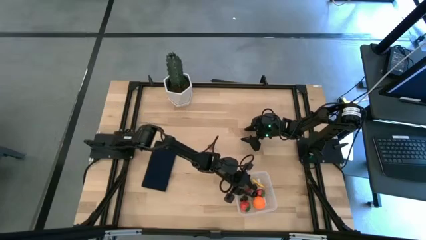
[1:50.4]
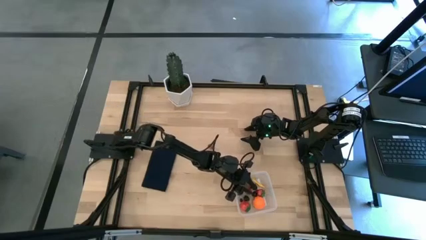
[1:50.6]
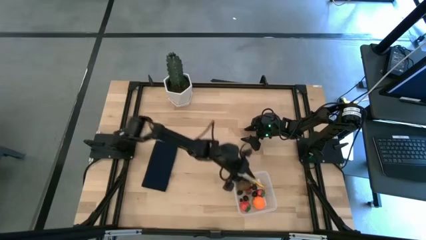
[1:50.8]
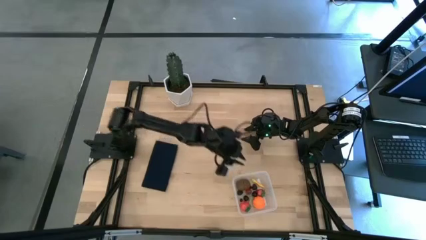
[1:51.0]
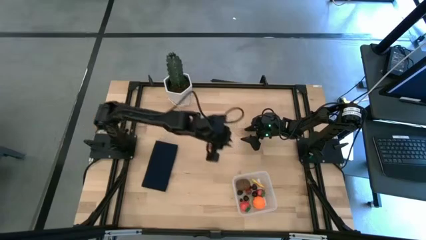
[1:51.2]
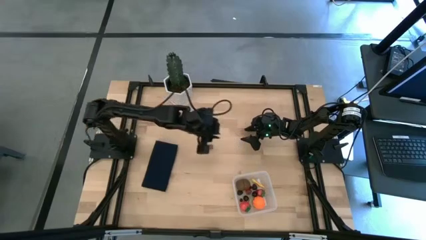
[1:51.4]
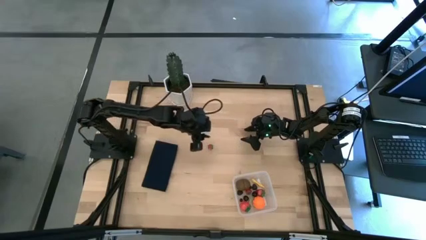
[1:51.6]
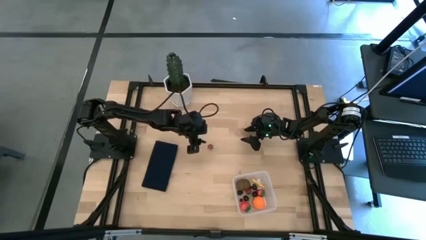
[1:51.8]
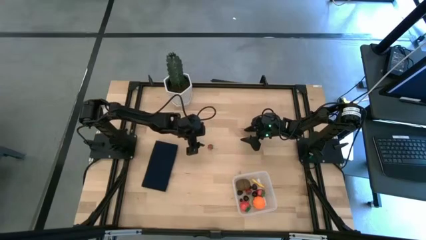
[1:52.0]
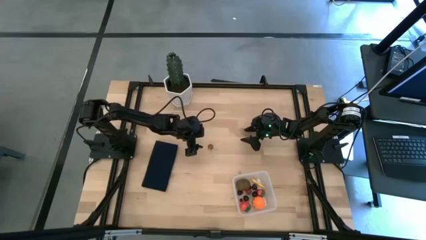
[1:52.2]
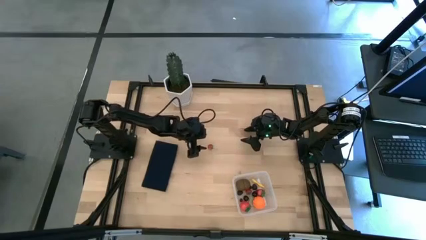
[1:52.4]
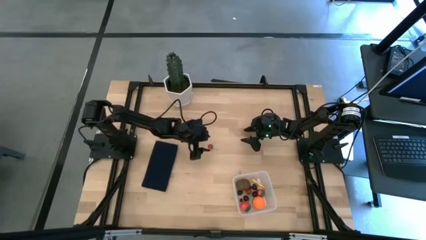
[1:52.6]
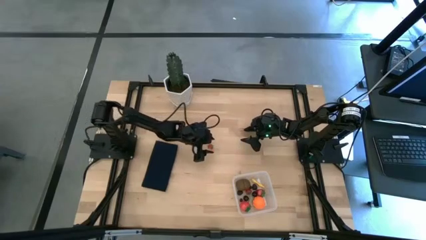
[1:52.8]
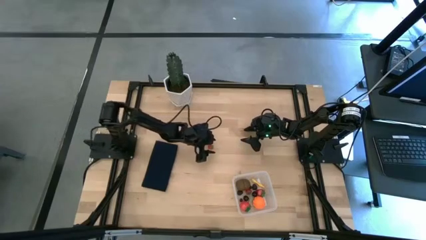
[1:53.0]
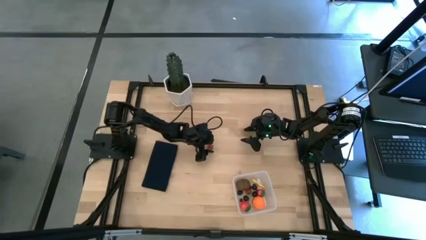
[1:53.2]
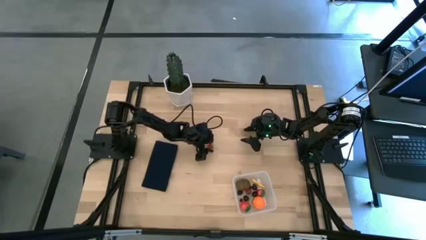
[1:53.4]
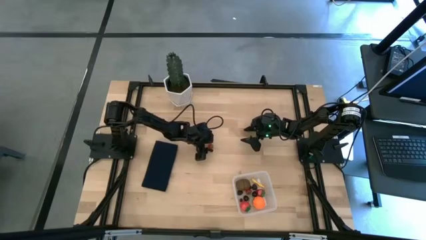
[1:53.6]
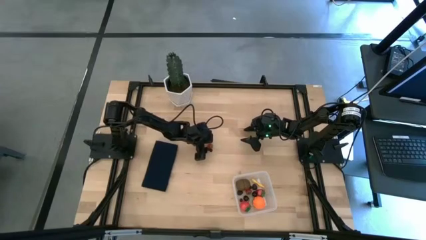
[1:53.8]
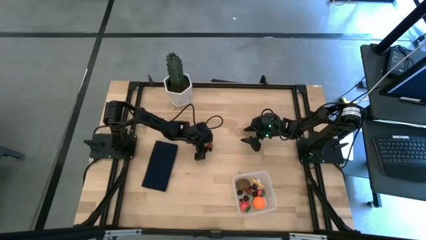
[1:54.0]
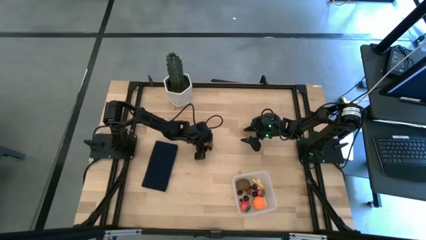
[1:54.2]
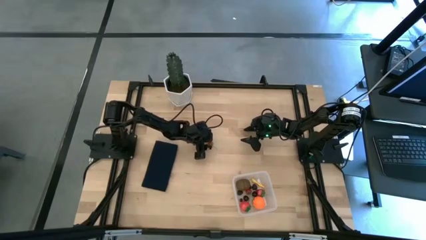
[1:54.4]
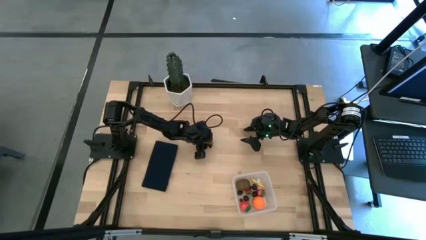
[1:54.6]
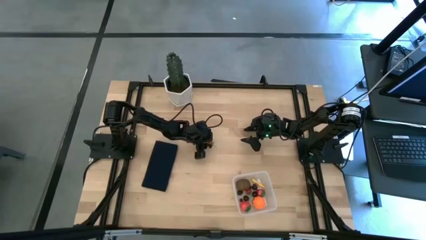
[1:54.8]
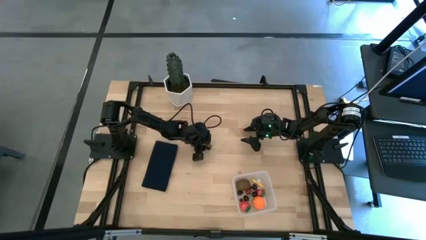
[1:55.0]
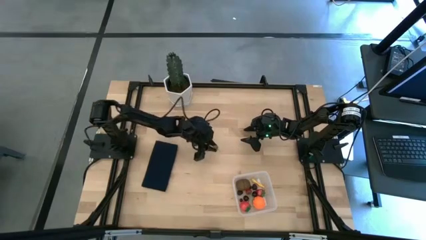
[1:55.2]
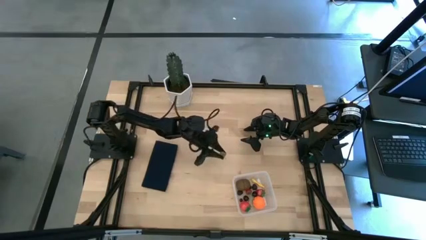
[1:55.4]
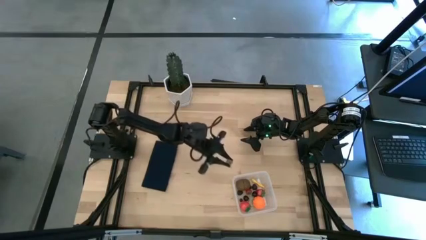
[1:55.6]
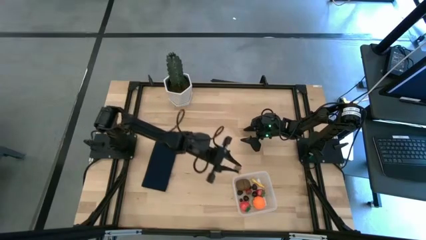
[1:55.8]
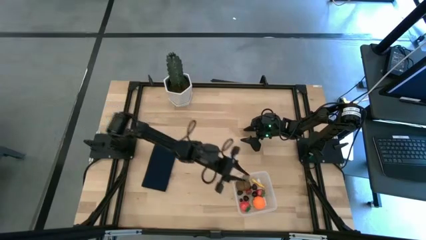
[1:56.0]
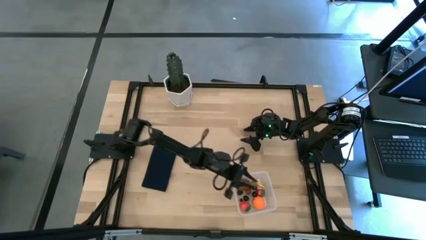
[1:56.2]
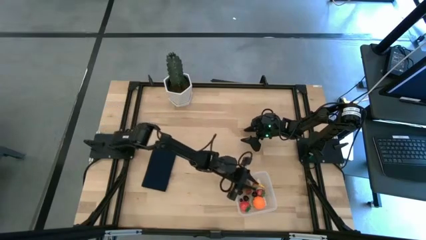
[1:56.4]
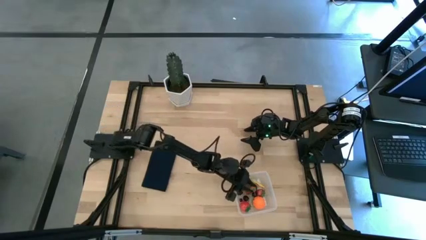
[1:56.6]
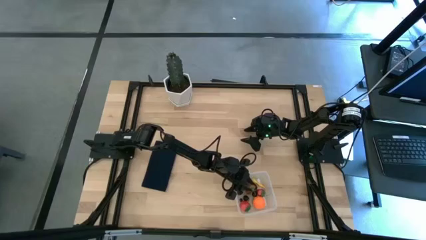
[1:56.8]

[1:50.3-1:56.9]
Task: Pick and placing Produce into tupperware
Put the strawberry into the transparent bin

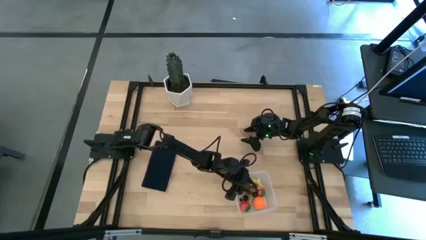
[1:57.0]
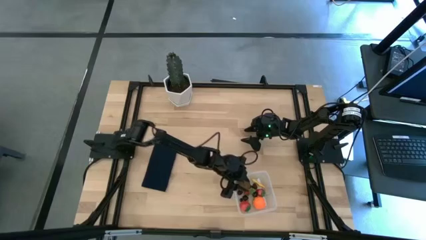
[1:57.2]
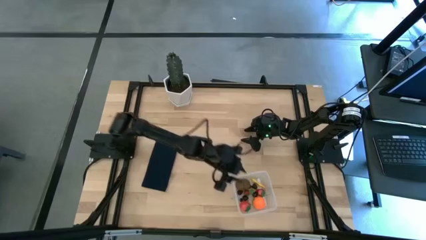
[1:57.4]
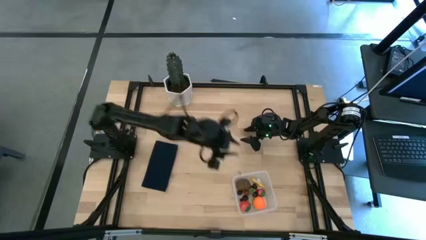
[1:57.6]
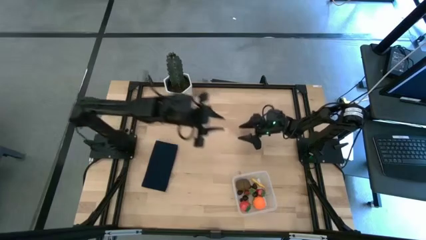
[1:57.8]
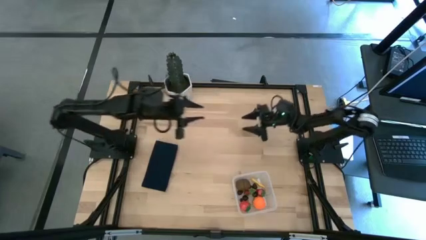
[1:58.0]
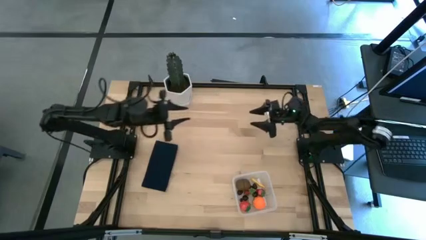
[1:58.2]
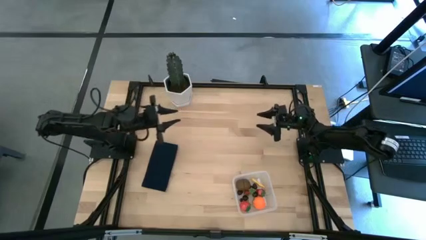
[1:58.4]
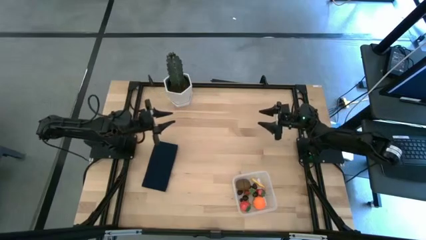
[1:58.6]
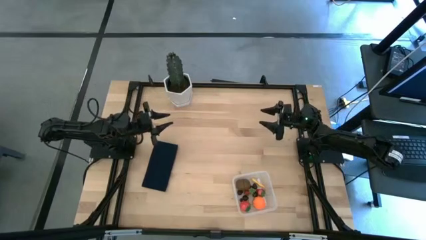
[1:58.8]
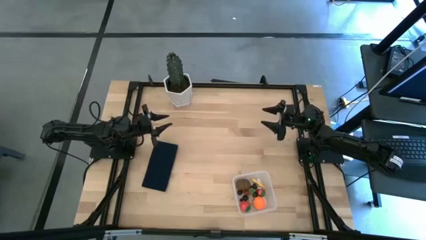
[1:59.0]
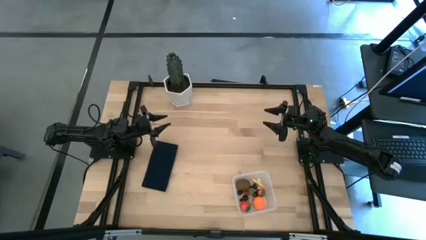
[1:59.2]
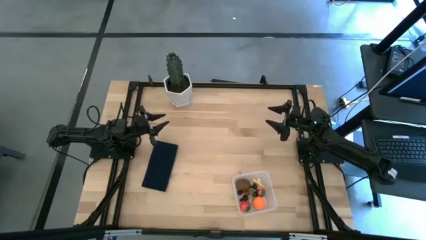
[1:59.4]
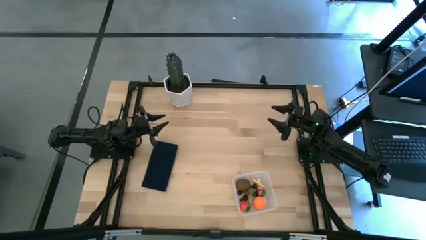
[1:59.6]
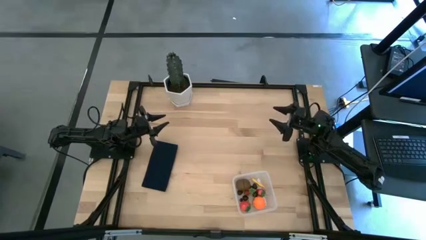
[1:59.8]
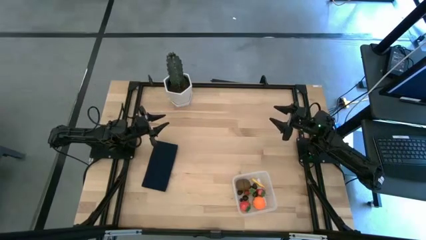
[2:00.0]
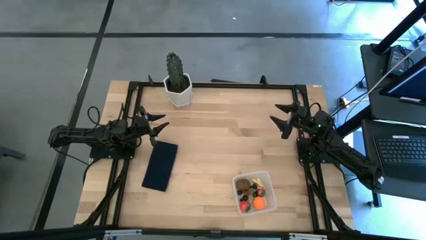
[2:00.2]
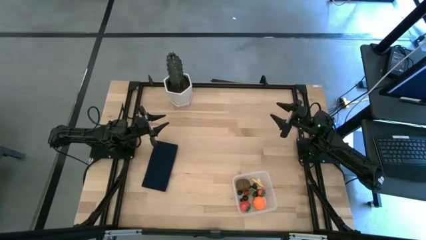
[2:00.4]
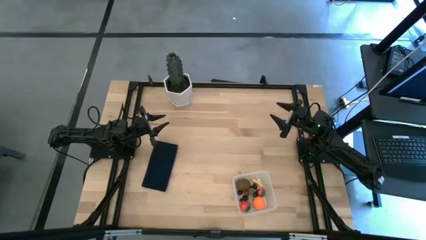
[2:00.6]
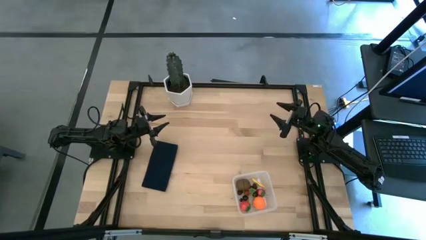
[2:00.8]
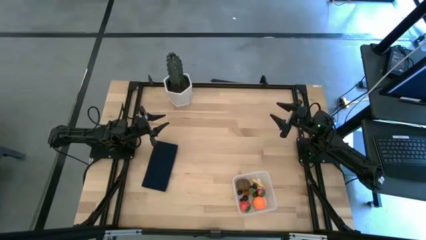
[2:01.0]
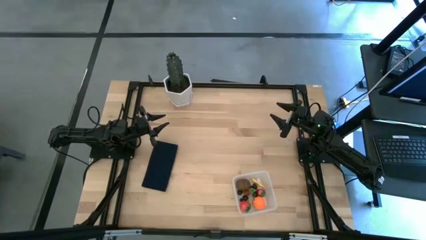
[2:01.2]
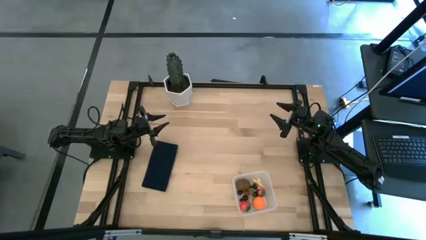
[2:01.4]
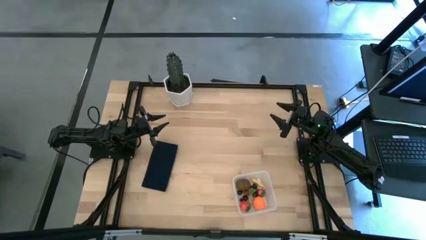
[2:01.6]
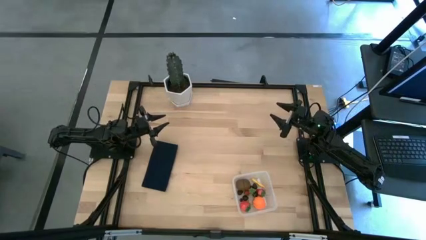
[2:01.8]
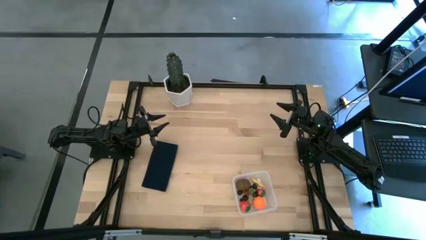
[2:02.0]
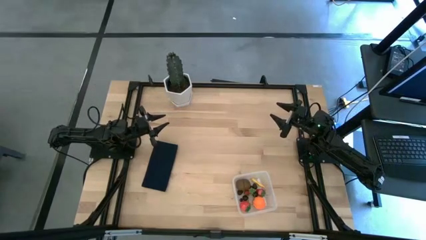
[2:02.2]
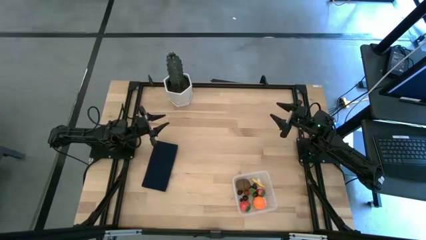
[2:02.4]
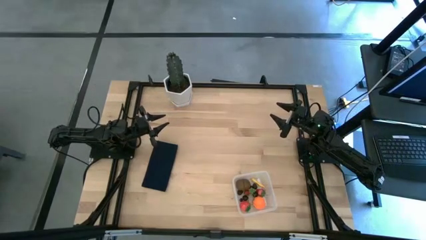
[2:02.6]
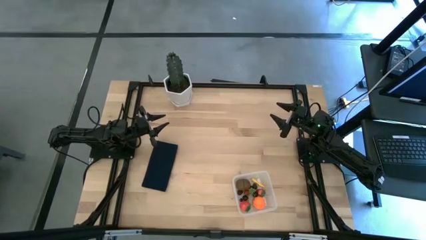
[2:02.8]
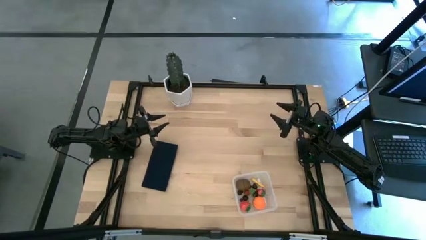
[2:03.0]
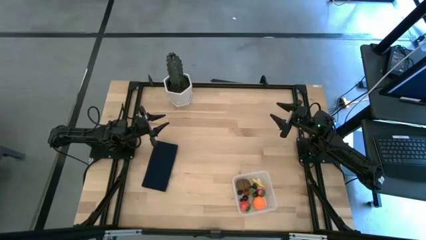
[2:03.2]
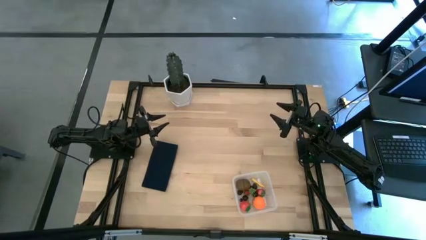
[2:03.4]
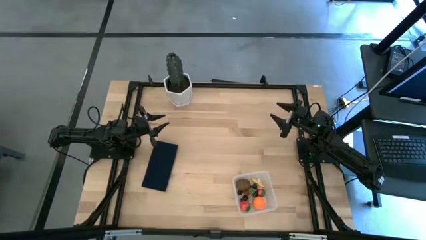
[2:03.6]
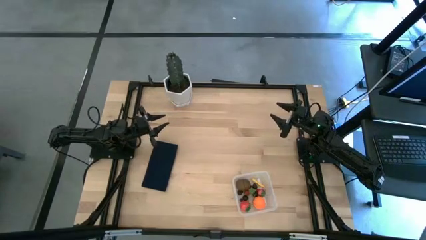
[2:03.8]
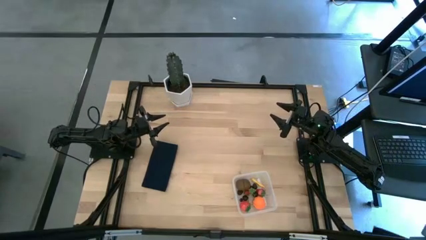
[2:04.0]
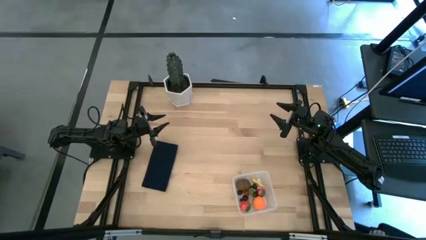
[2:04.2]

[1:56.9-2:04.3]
Return to Home Position

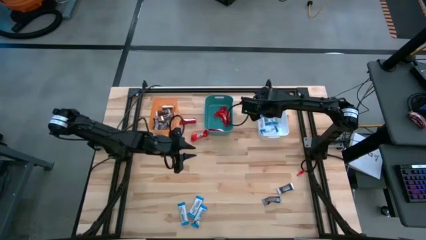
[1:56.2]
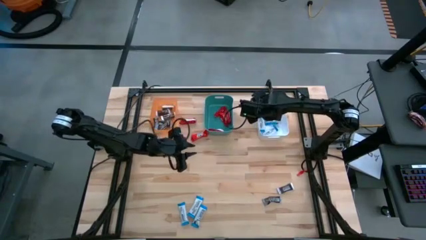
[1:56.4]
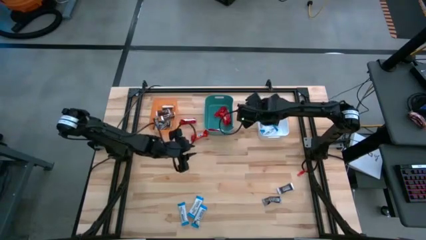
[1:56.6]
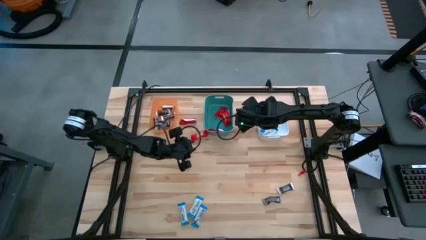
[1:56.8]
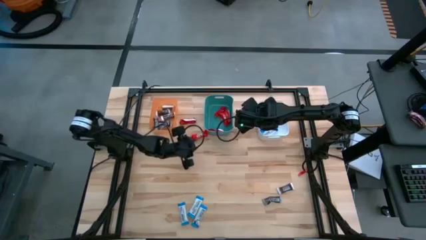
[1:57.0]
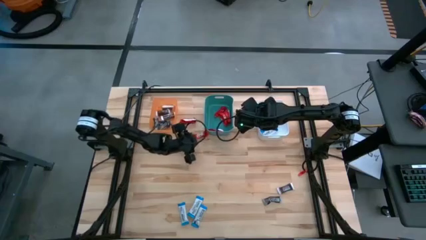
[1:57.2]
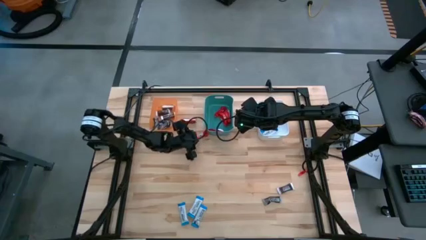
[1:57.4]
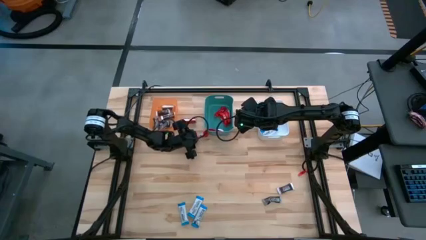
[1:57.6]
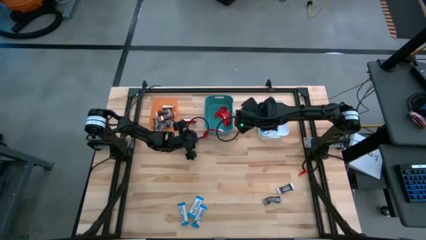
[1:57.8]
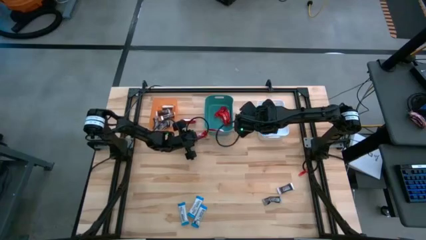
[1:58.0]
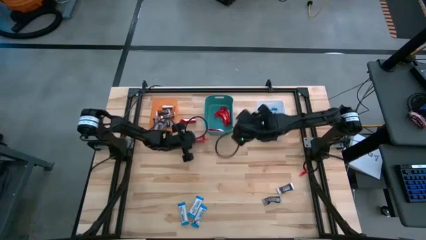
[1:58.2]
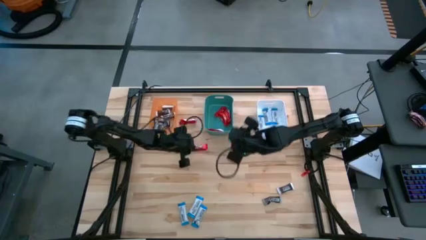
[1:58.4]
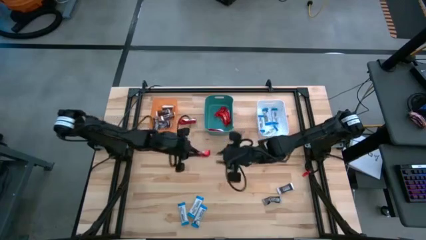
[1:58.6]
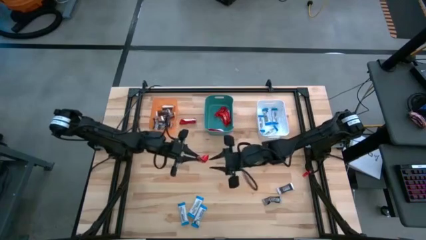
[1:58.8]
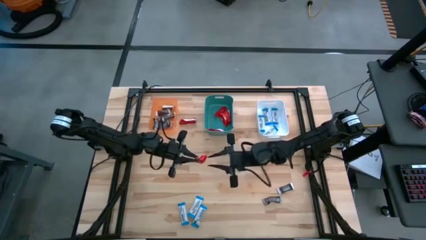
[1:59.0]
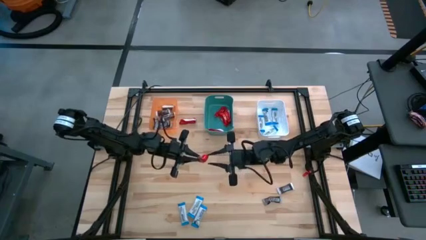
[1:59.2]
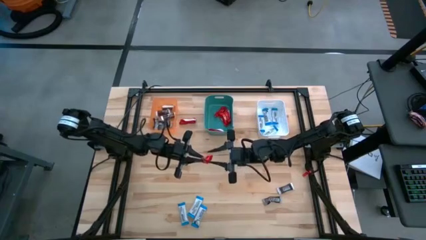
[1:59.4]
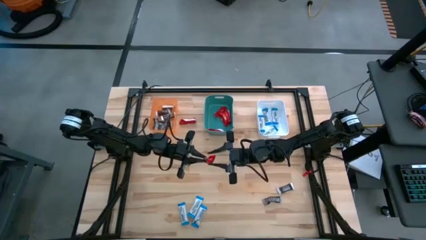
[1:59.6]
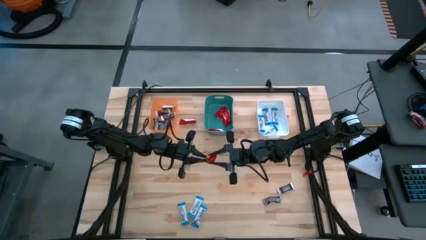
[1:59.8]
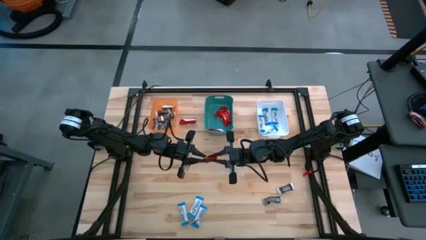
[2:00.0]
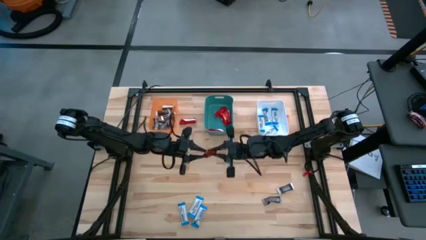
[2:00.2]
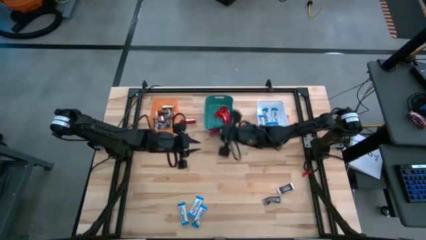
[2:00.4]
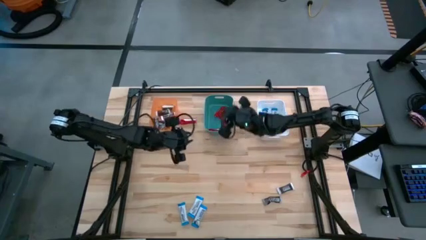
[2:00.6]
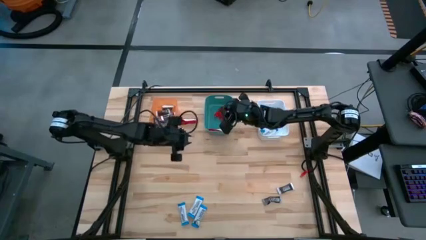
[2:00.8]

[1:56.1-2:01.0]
Task: Organize candy in baskets
Put the red chocolate bar into the green bin
